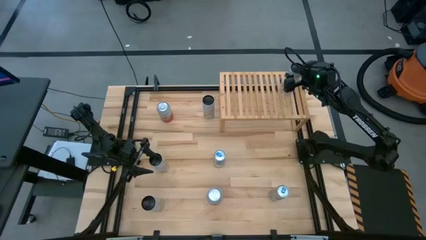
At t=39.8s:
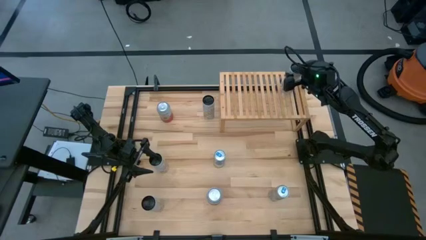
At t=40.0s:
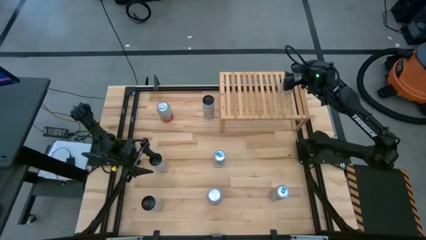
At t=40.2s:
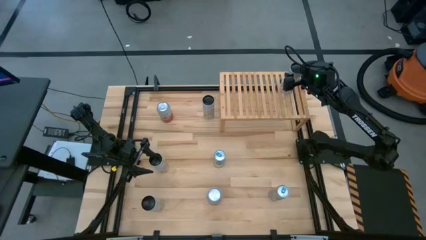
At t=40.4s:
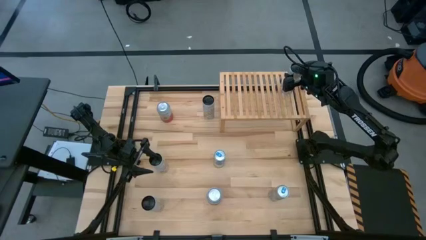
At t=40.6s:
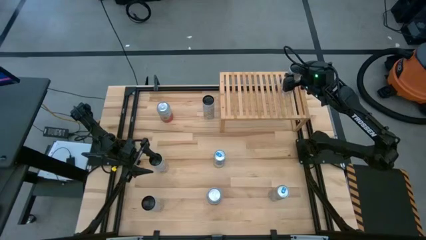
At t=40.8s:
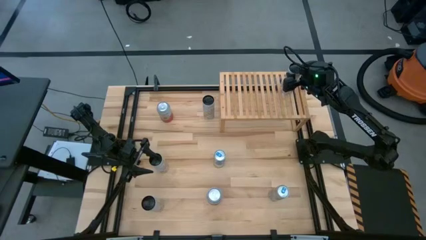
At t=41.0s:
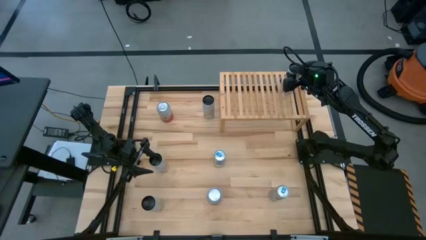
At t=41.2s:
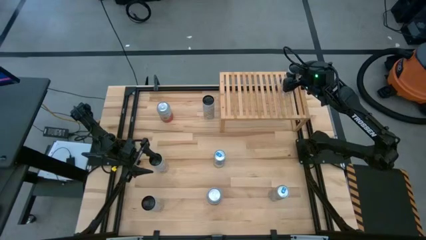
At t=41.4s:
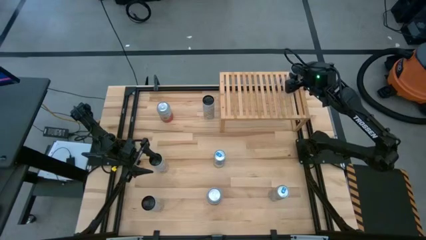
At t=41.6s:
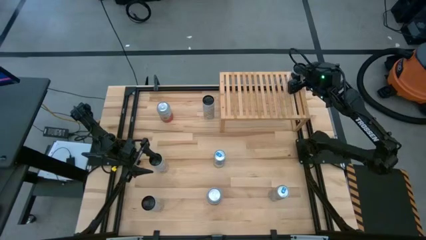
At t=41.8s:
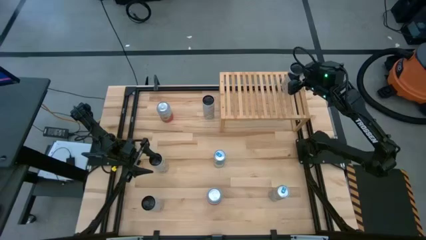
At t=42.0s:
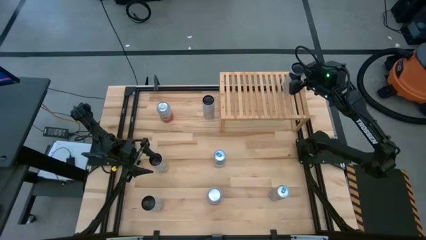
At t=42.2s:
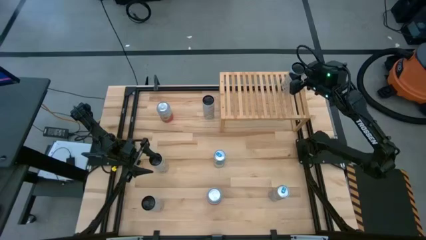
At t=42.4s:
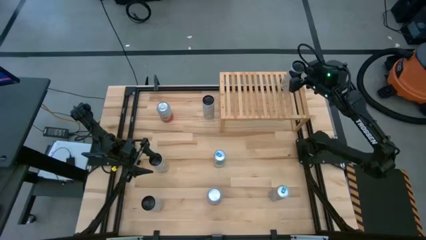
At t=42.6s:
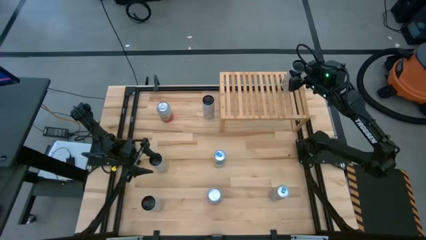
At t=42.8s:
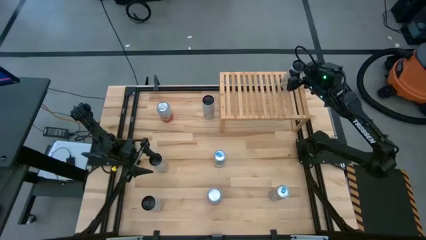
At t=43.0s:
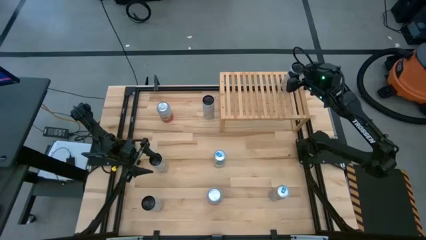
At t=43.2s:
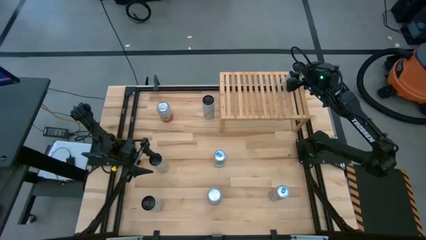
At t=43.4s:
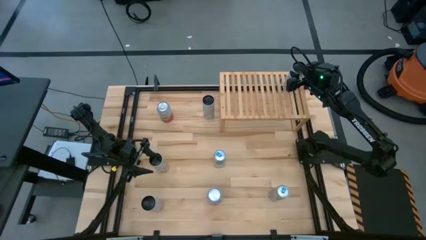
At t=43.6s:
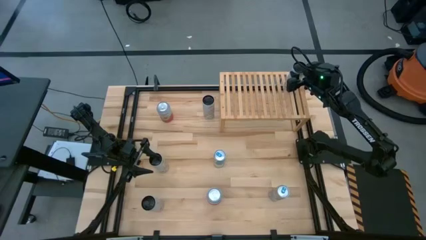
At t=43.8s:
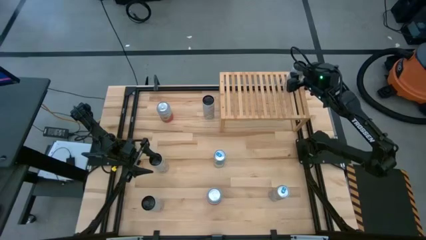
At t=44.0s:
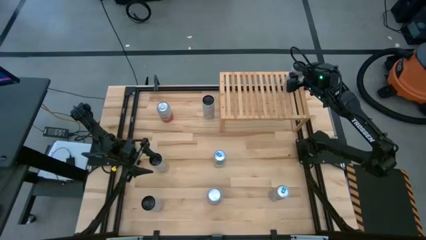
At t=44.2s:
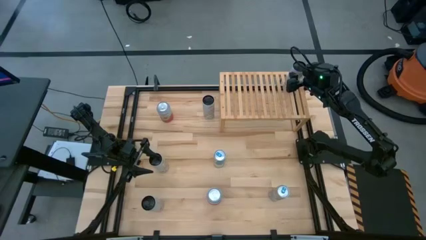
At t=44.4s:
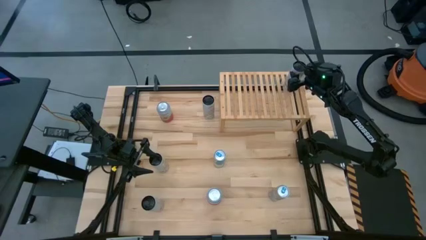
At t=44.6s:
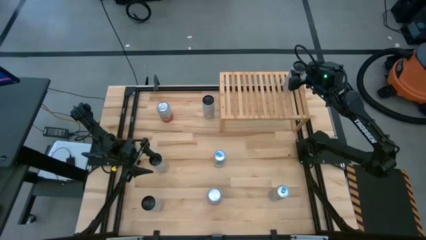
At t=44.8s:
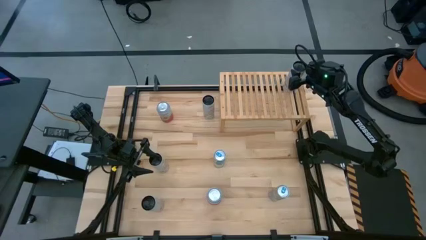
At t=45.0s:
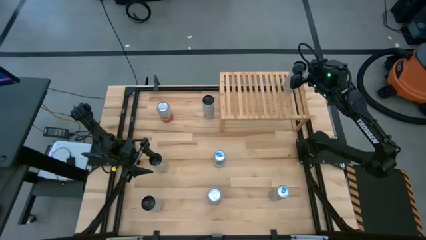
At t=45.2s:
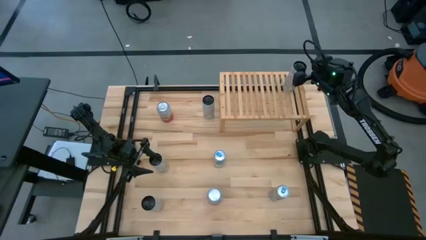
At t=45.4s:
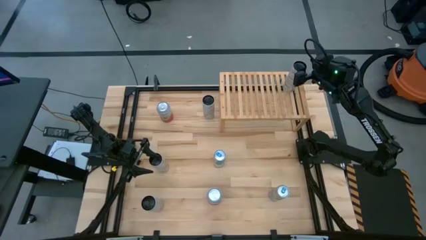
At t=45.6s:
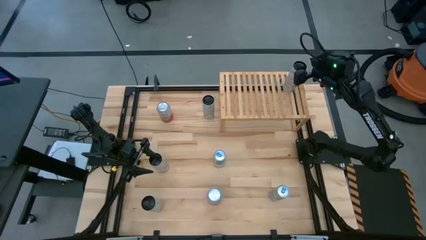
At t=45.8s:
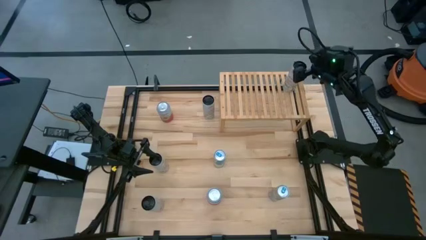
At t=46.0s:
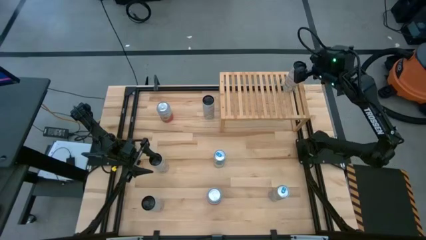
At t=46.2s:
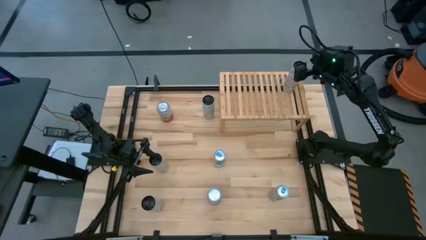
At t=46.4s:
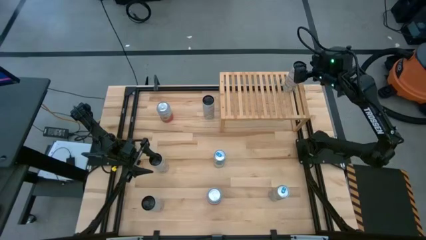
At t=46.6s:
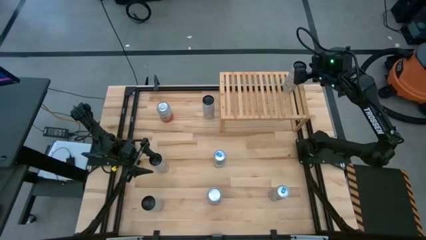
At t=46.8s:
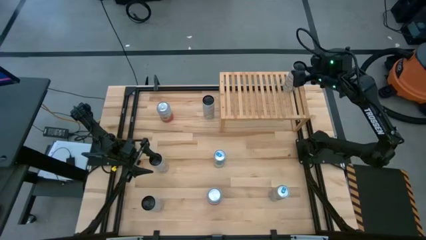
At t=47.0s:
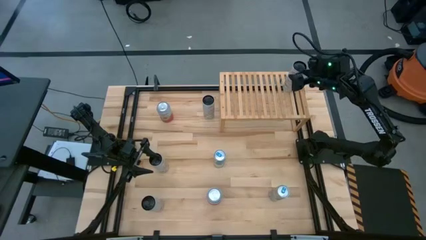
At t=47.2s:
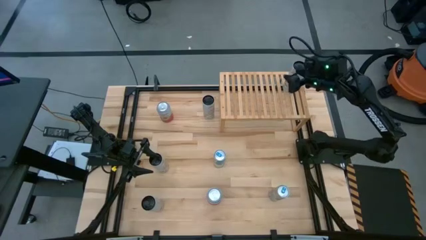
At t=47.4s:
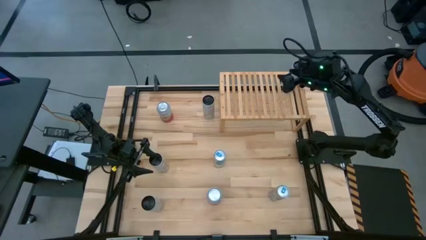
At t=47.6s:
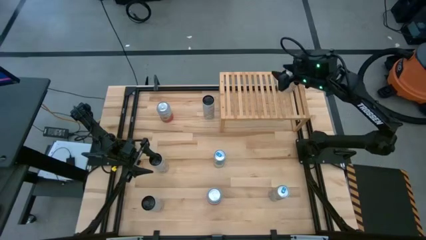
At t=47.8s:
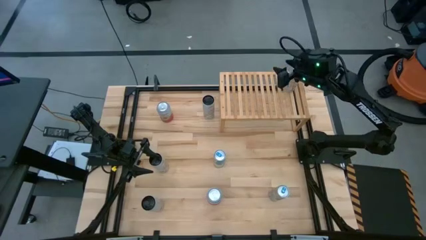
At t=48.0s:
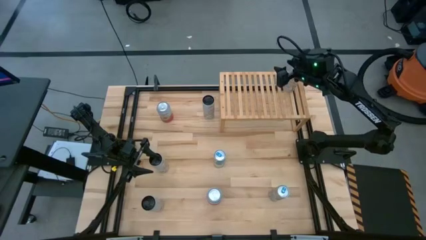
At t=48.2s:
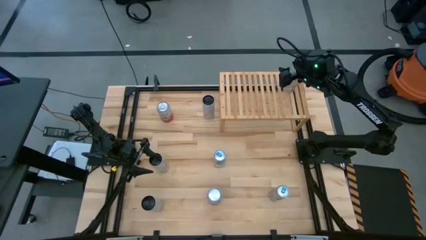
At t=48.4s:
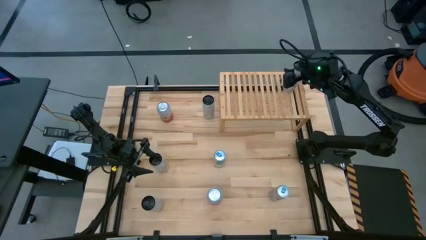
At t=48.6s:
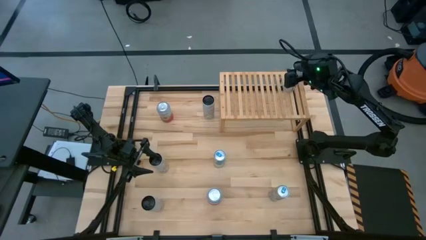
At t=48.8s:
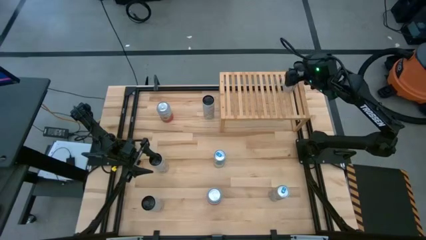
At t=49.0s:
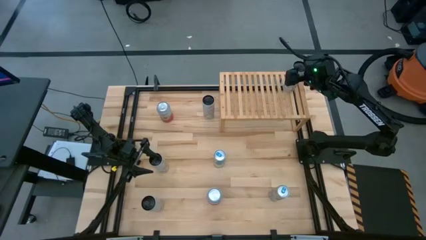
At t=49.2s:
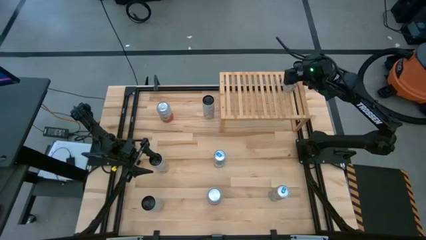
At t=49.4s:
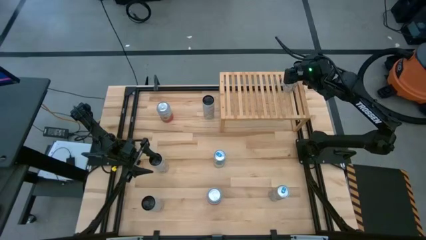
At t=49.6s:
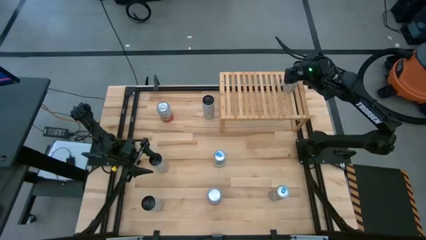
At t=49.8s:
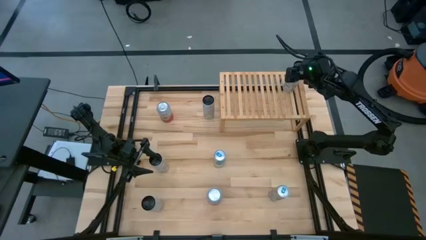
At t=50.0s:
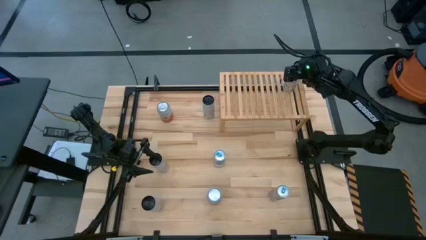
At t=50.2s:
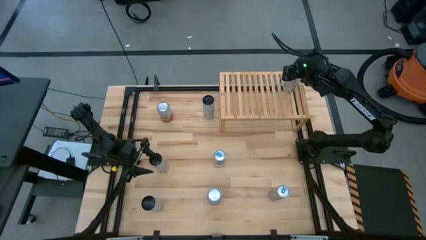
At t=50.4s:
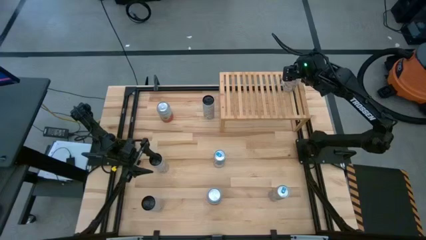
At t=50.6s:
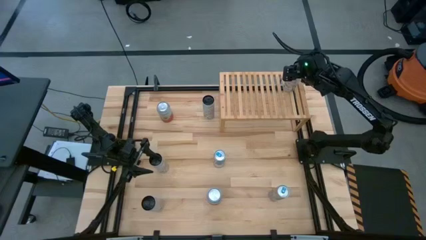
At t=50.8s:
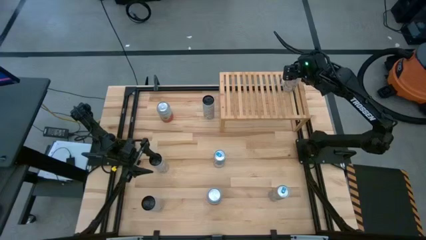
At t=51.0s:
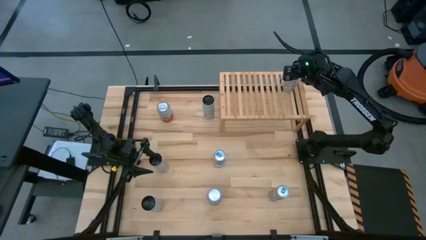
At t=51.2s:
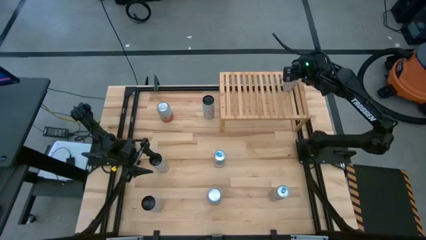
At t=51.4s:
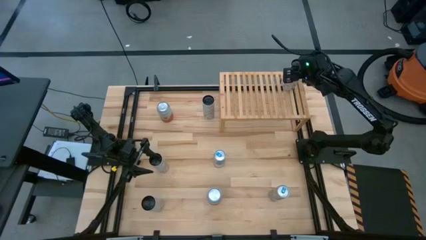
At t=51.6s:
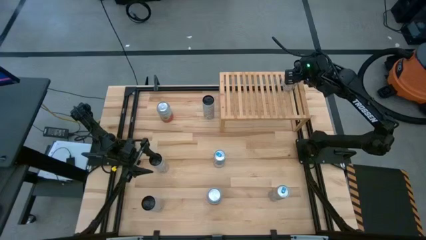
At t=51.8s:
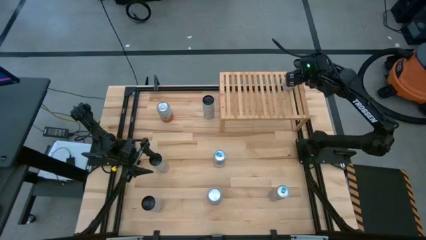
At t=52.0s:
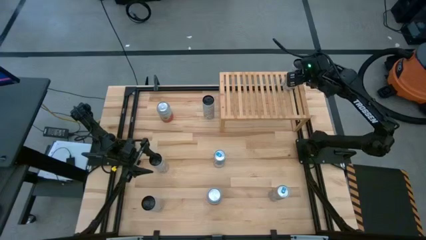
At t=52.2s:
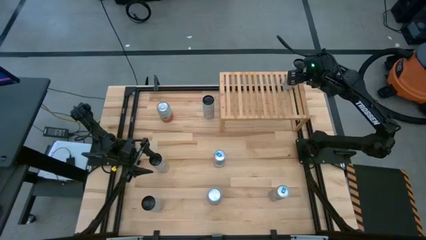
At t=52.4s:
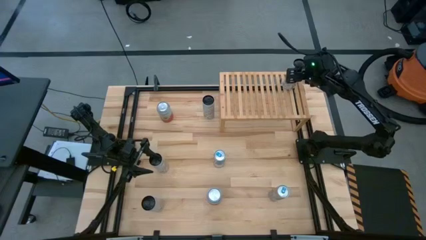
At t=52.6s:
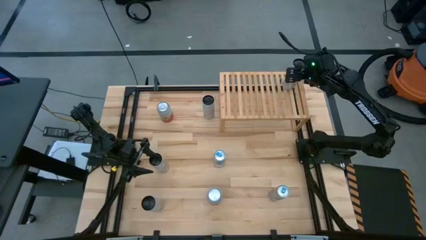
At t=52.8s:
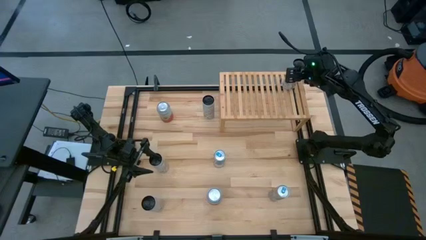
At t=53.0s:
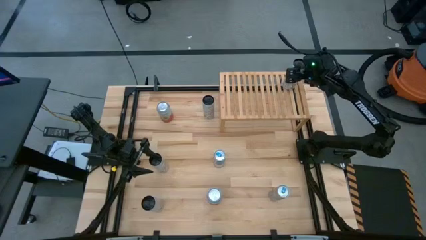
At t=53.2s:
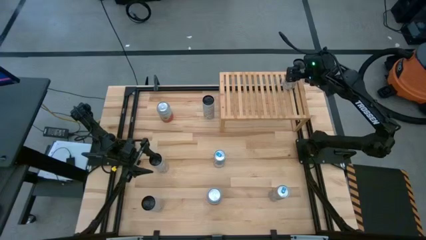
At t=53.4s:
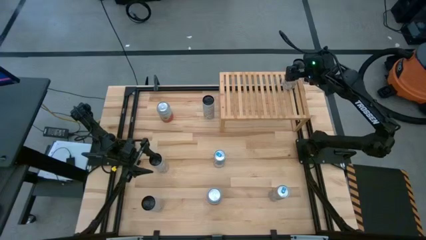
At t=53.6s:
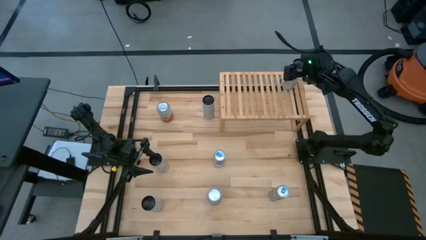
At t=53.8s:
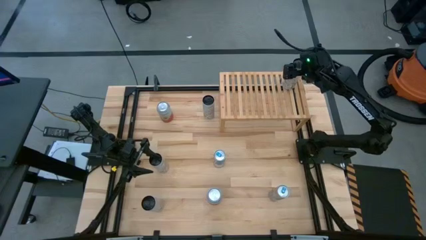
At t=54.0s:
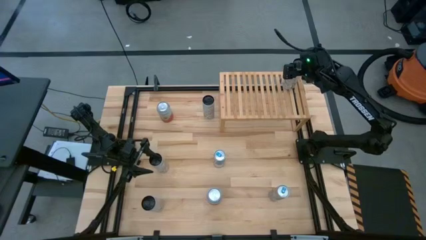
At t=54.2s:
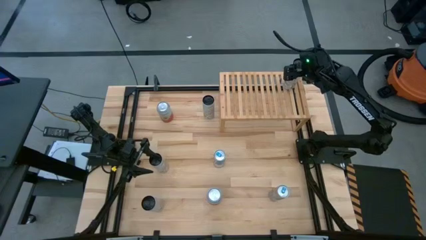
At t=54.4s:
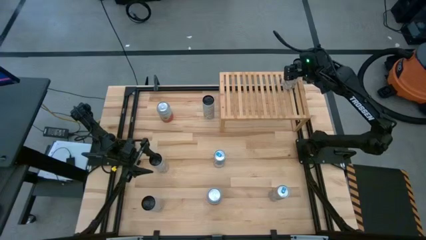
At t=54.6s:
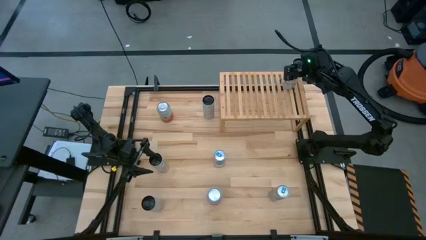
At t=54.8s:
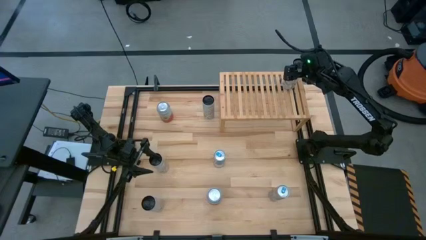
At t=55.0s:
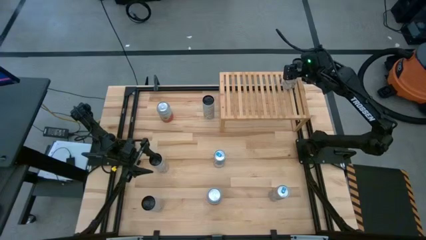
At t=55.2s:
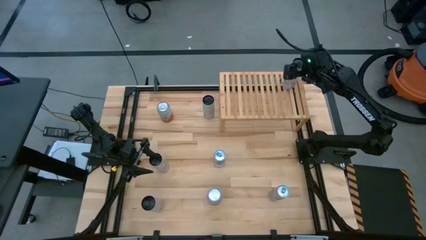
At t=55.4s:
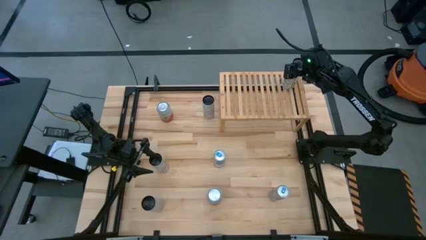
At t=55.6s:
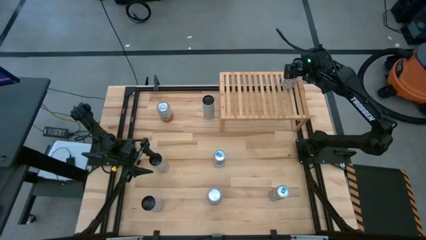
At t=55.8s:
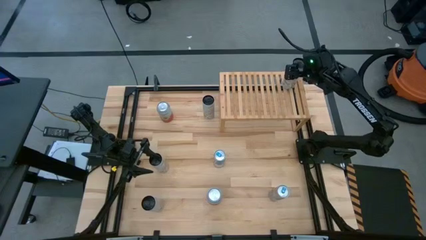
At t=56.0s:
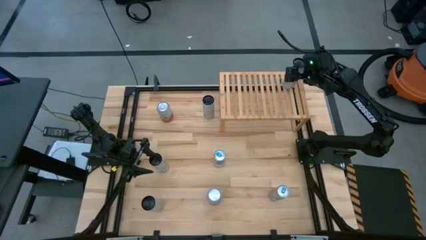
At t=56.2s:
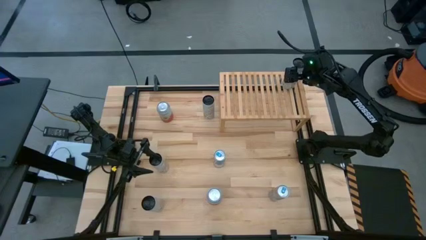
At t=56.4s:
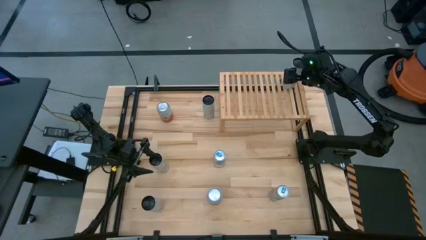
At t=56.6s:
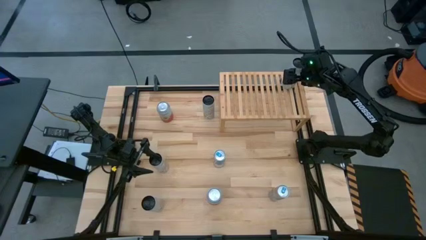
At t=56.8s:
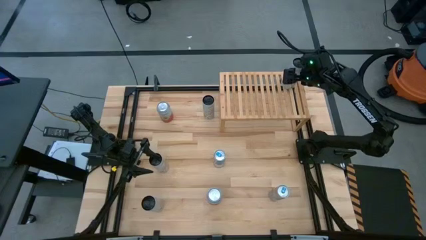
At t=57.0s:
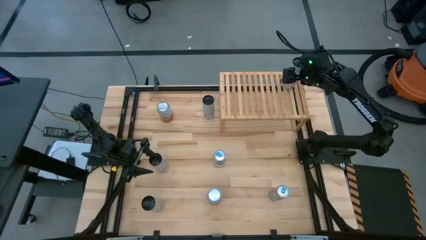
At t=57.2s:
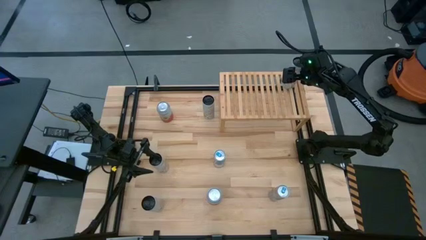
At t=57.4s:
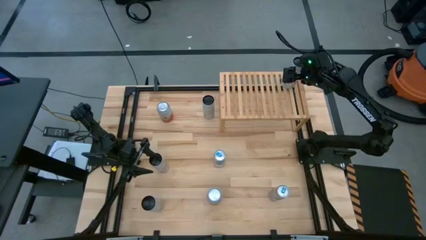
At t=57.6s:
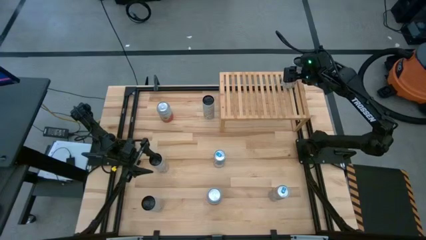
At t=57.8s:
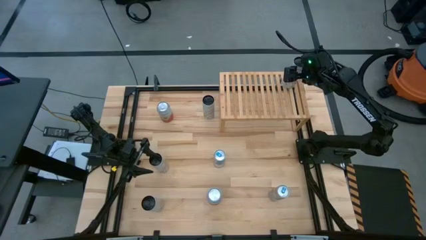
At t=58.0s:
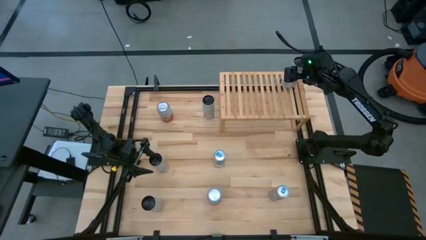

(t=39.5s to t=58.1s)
Task: Place canned beverage on shelf
Put the bottom white-yellow soda can on the shelf
